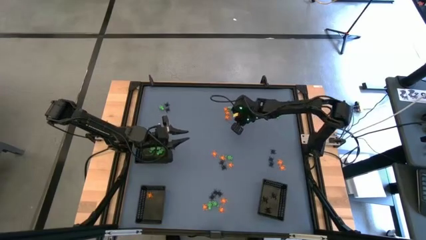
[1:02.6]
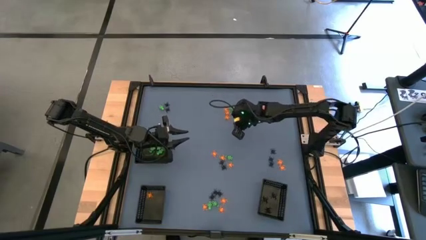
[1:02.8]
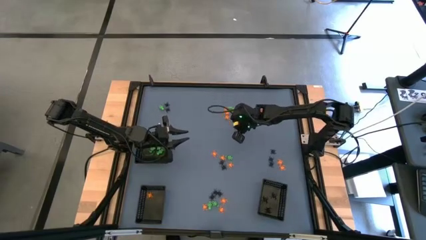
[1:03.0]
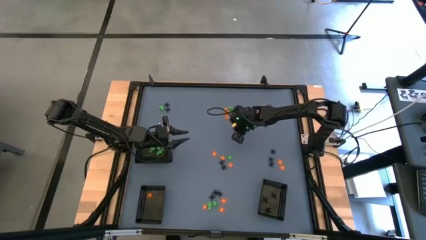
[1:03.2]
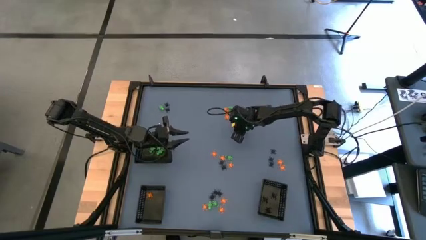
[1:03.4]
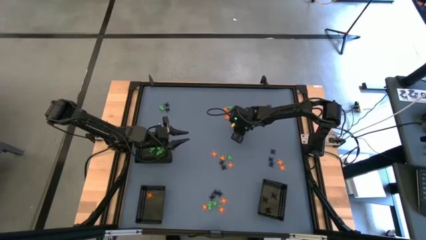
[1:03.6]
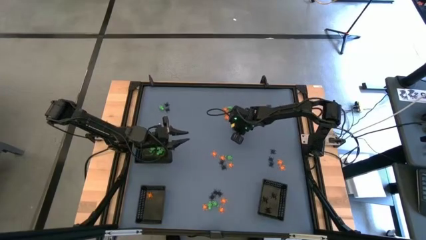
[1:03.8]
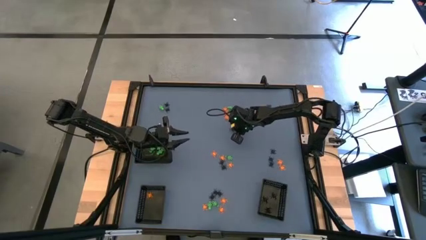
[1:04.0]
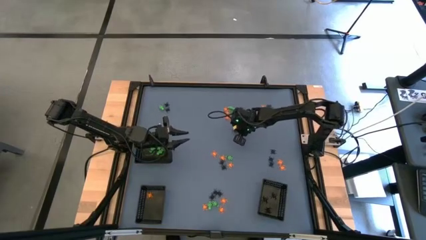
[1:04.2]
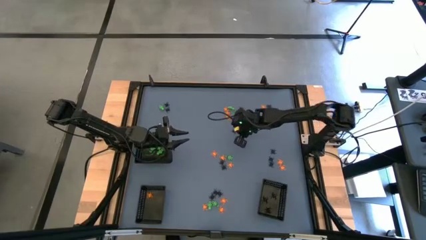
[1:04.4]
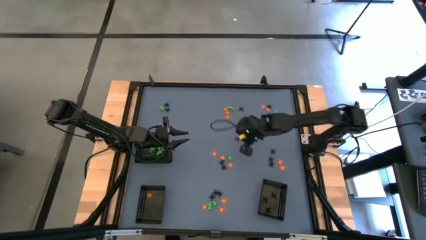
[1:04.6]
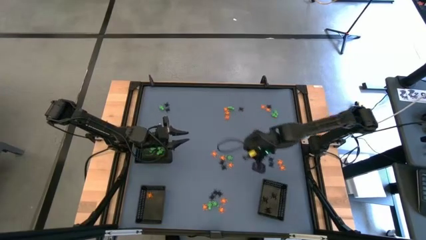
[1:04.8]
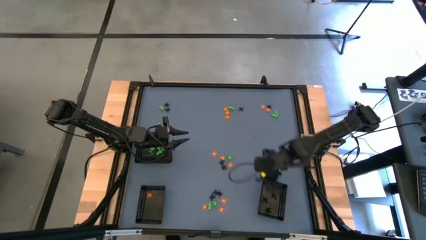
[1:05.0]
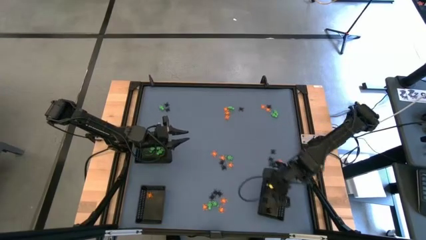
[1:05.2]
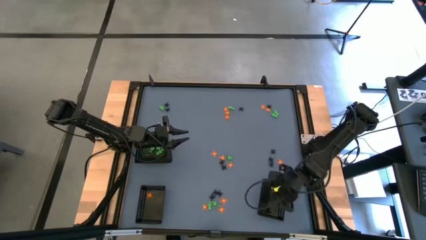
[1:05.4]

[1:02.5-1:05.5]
Task: Sort Halloween decoration
Put the black spider toy into the bottom right black bin

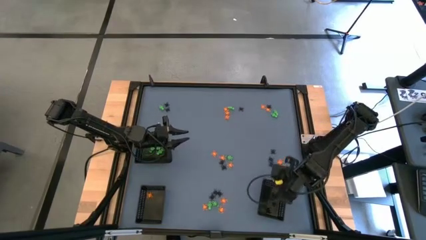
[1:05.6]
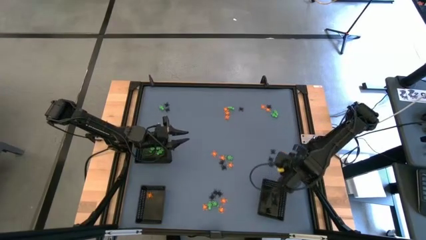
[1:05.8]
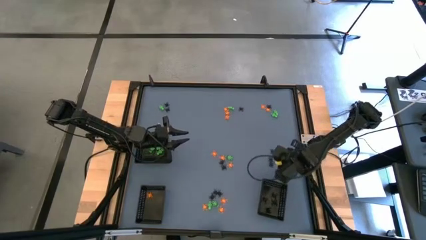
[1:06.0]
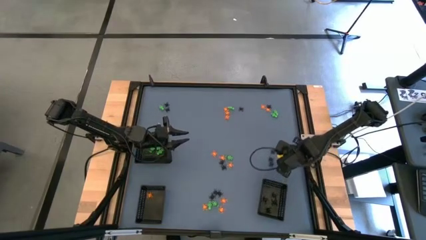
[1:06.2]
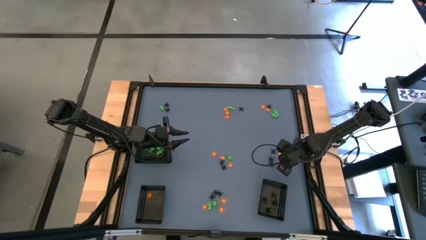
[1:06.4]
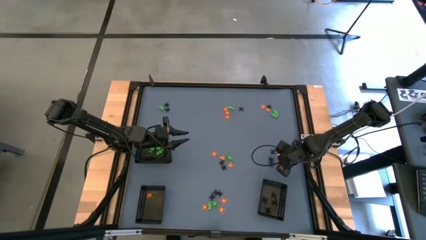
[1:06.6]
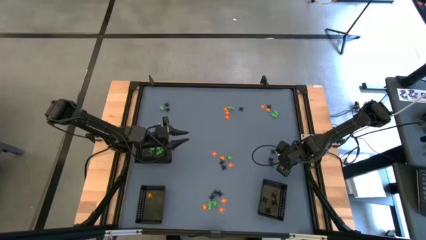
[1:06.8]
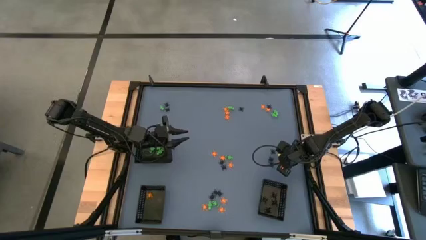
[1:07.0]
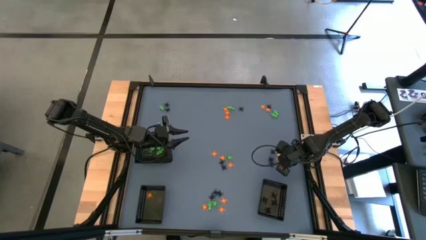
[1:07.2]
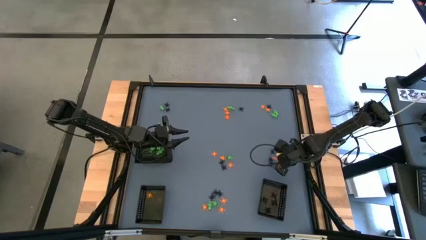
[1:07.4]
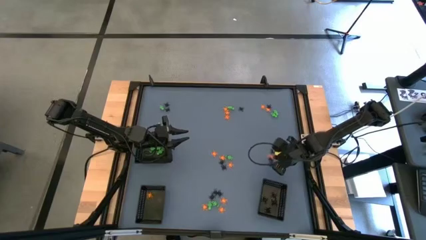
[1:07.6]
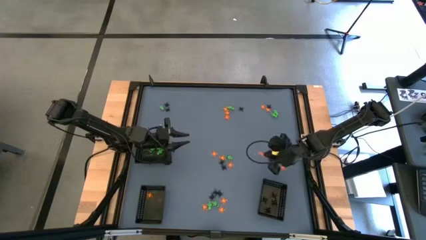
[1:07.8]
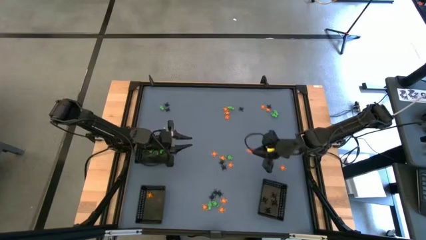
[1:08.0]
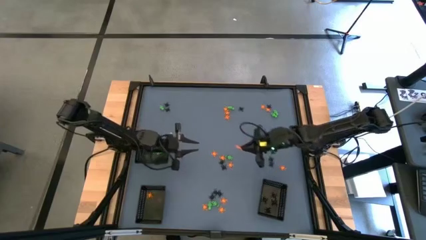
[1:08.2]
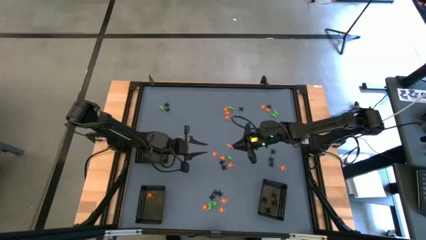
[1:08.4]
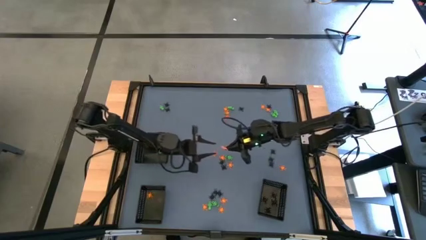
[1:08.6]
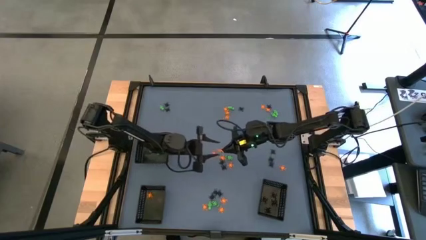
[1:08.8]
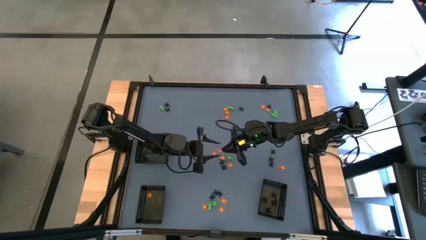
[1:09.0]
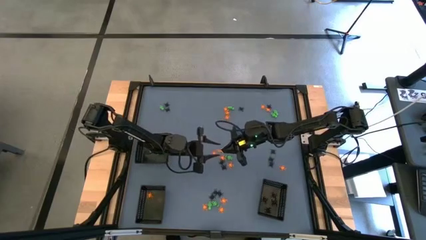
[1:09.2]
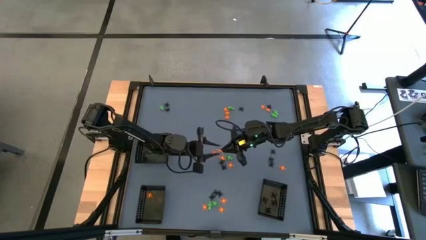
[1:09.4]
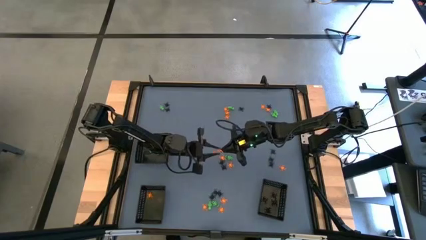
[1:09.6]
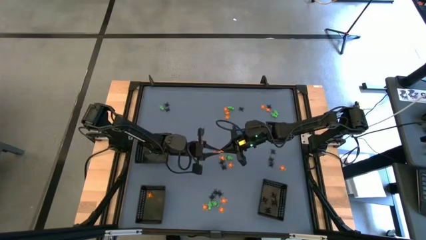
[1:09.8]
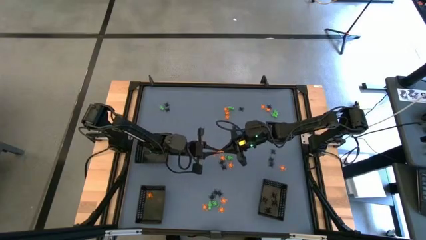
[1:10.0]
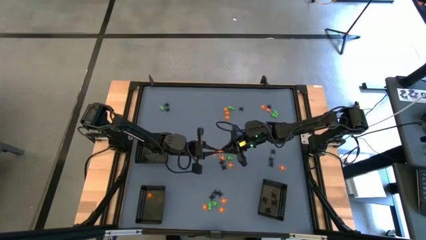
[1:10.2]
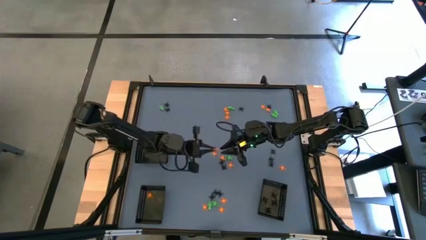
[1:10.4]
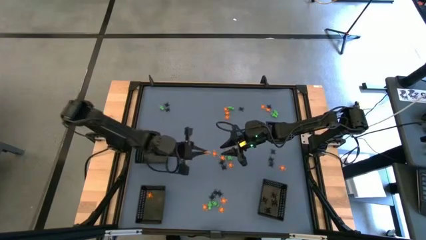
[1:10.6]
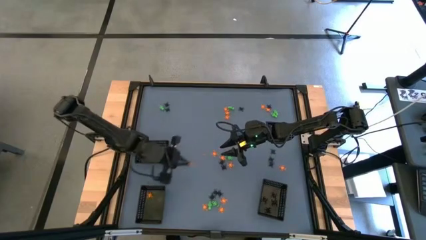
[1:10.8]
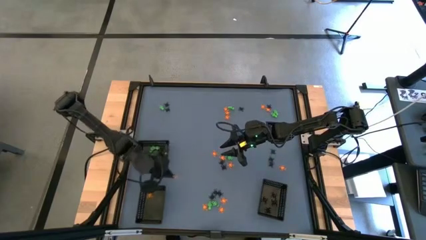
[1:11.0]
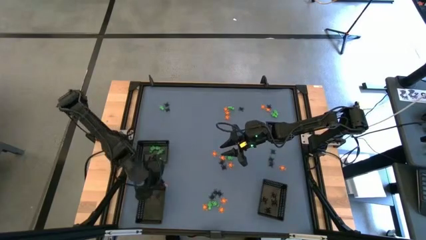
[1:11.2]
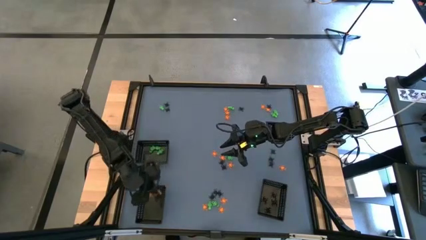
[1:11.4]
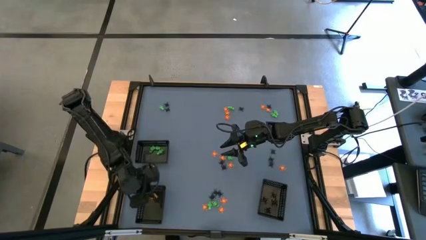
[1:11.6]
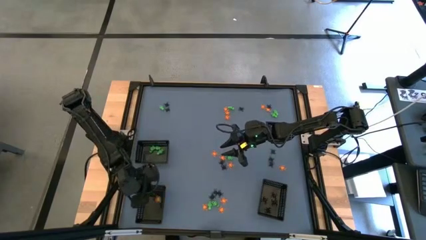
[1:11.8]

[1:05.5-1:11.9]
Put the orange spider toy into the bottom left black bin

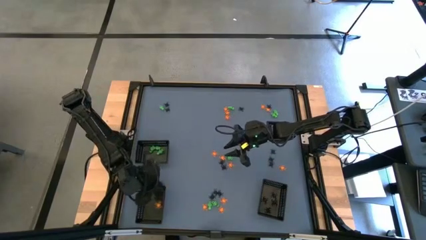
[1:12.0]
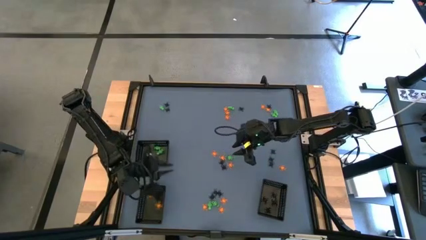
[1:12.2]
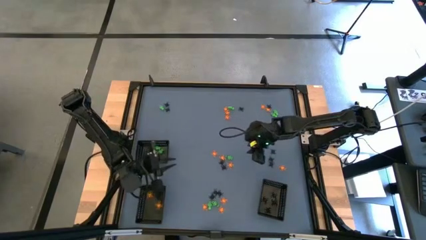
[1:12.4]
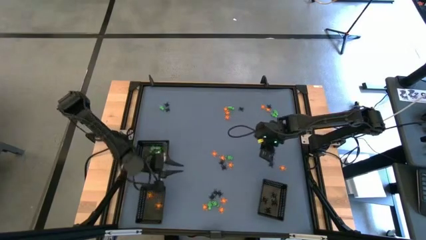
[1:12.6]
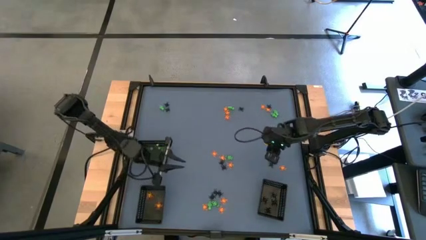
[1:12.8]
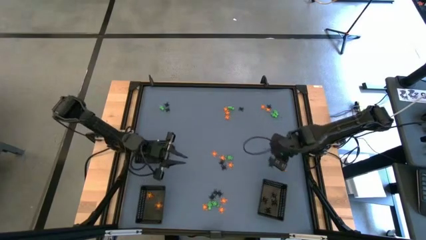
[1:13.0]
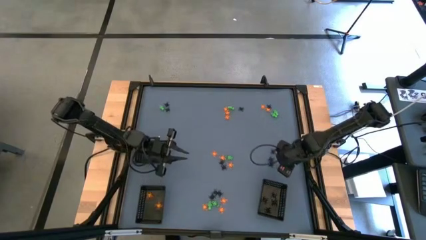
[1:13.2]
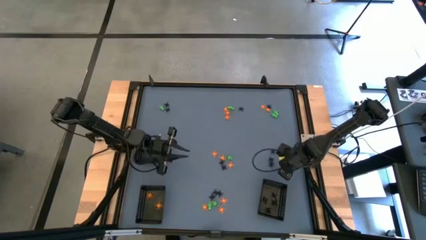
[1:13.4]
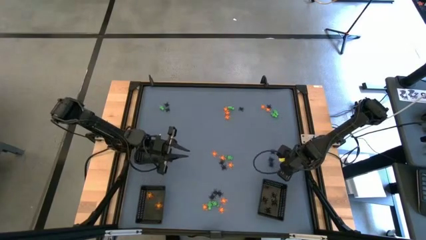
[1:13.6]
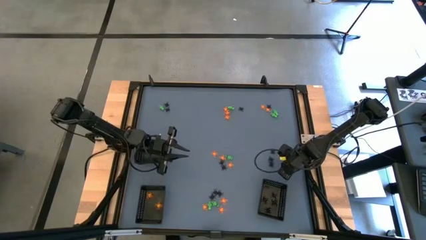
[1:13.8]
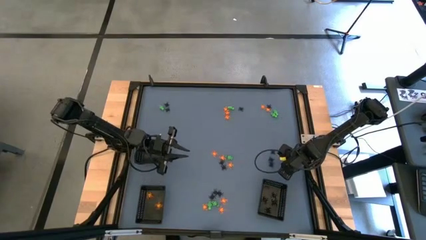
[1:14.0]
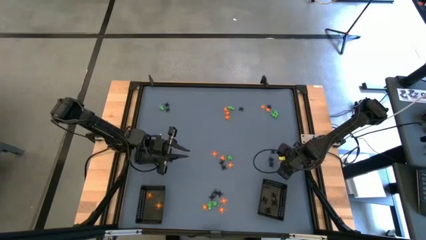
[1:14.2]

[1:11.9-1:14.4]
Put the orange skeleton toy into the bottom left black bin

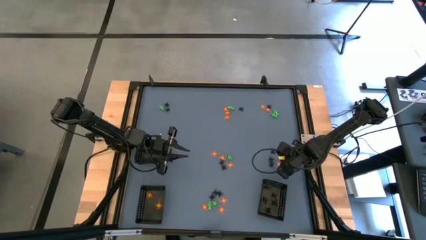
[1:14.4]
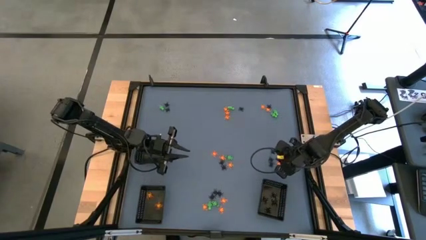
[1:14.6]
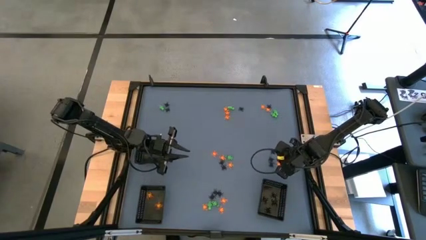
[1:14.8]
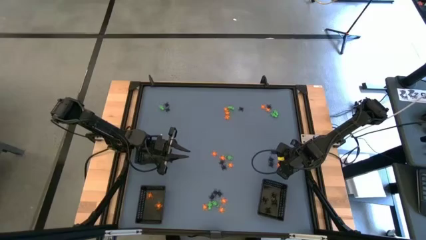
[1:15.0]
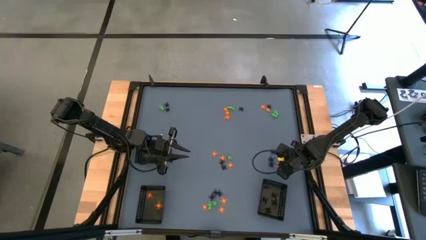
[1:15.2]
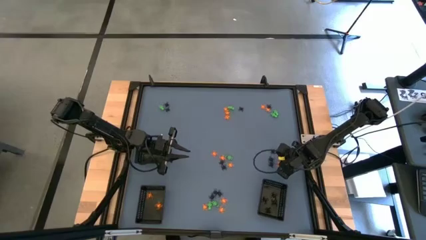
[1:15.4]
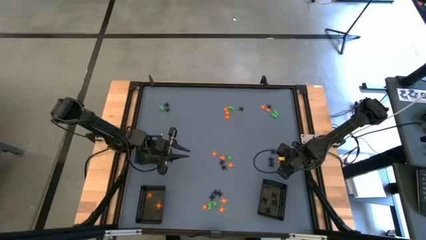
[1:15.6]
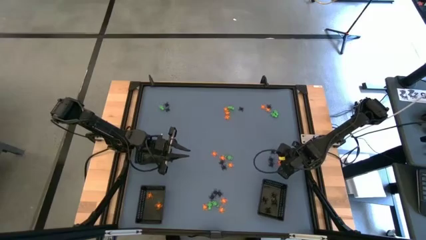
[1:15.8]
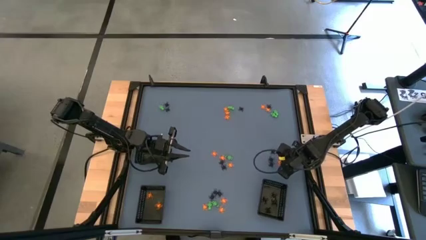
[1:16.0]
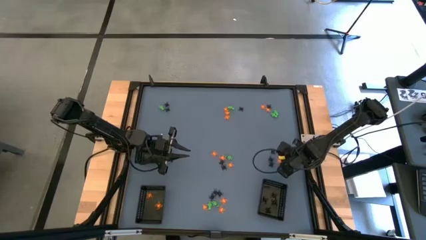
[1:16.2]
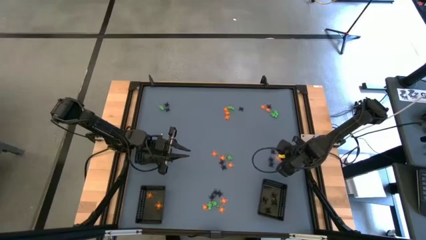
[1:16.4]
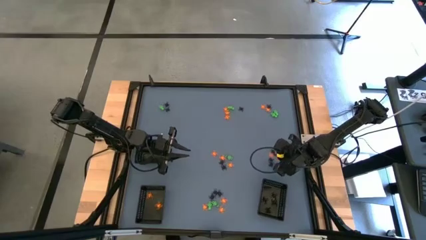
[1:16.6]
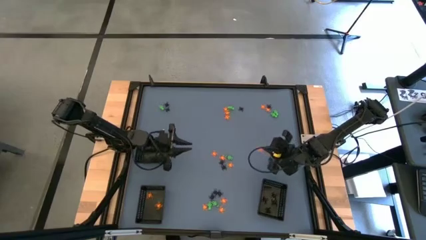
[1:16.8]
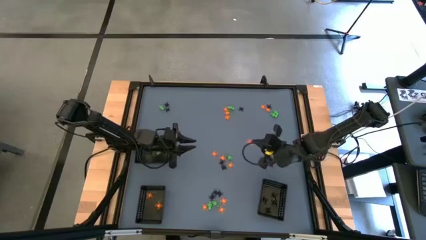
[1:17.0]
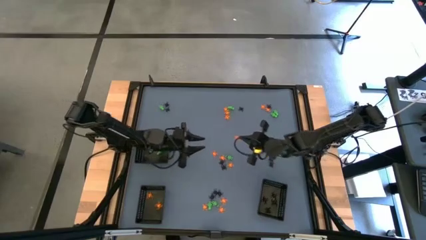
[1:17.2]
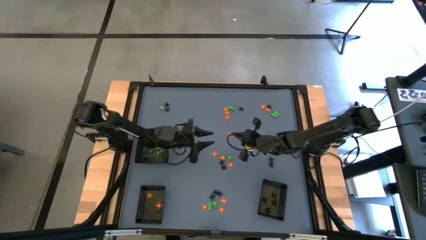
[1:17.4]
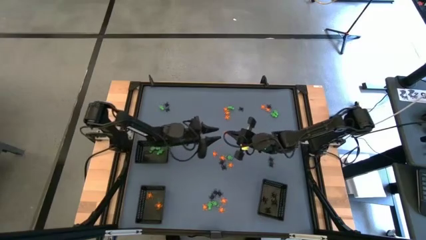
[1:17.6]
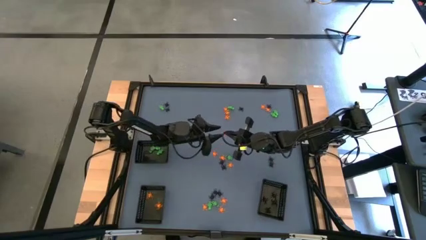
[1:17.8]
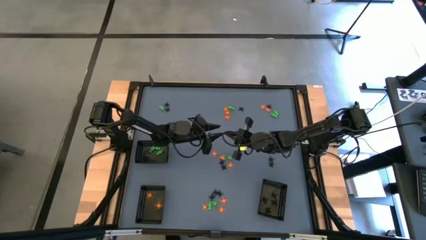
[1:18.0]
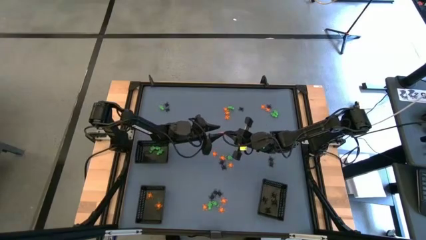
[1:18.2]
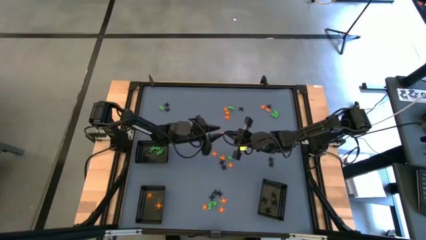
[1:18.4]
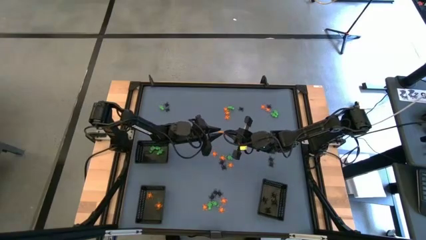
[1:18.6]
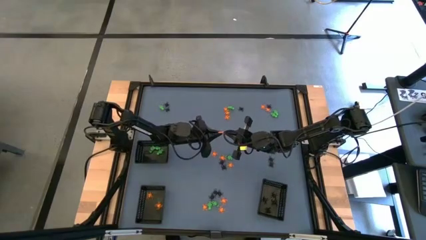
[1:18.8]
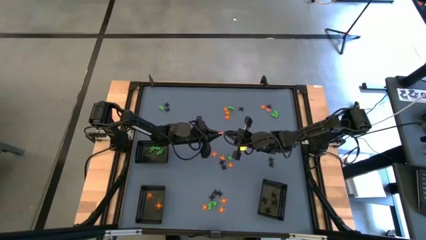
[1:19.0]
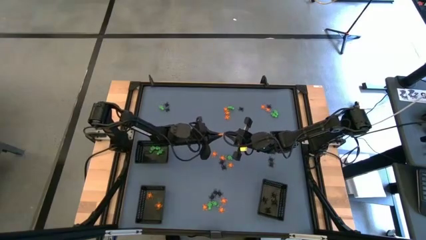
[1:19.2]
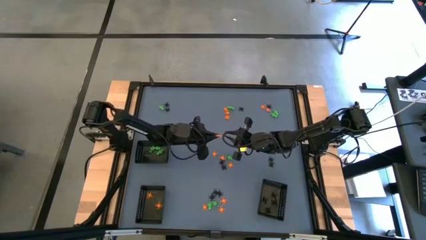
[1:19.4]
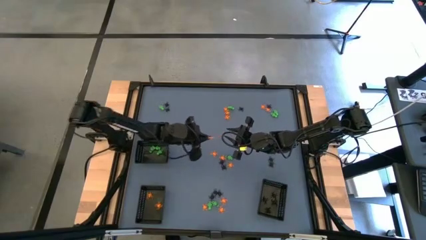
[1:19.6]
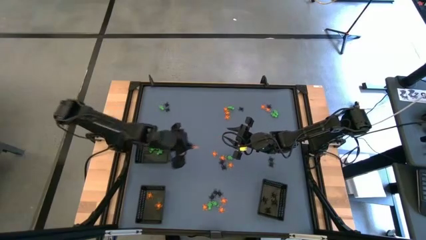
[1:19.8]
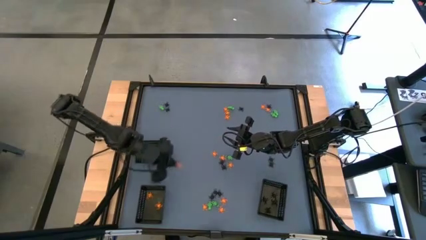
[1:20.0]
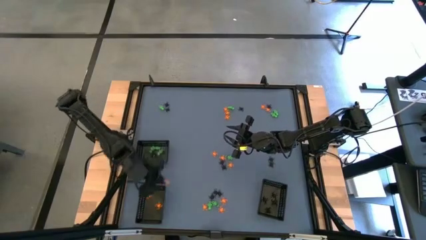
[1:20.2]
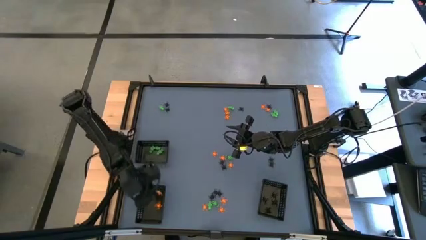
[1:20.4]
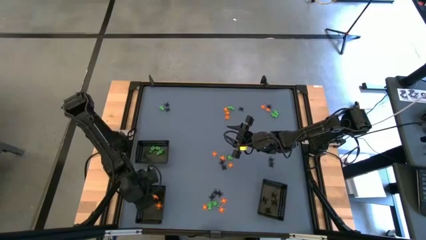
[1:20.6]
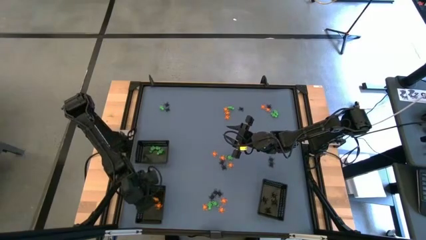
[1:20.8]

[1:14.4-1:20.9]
Put the orange skeleton toy into the bottom left black bin
